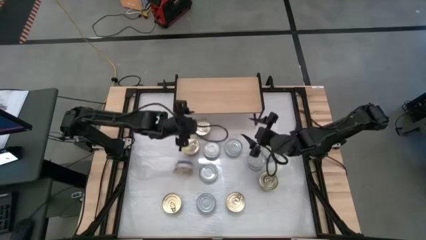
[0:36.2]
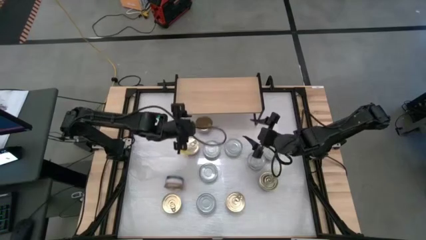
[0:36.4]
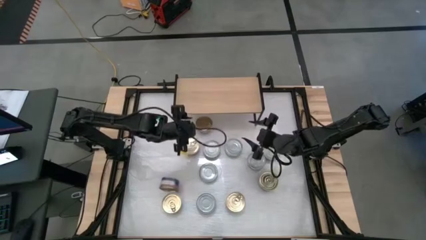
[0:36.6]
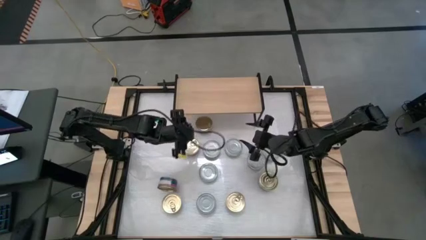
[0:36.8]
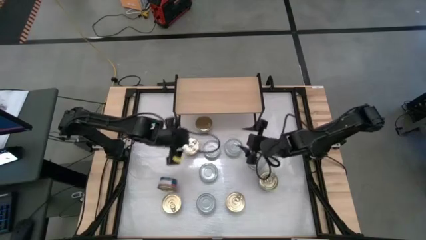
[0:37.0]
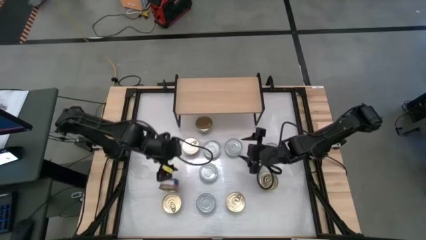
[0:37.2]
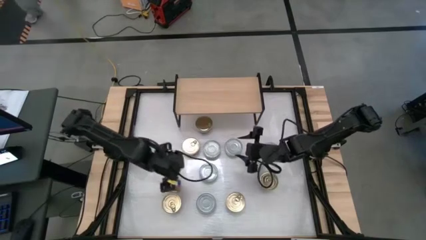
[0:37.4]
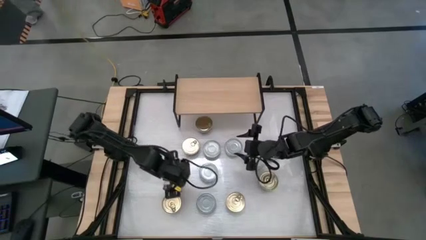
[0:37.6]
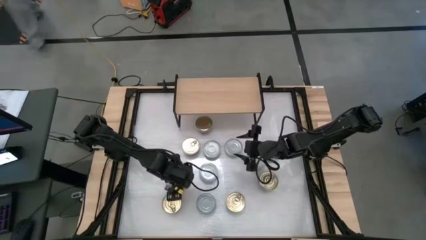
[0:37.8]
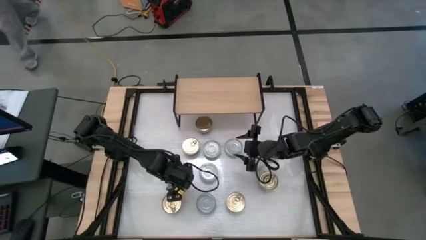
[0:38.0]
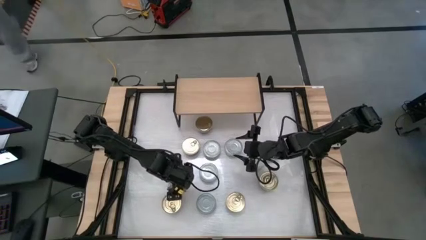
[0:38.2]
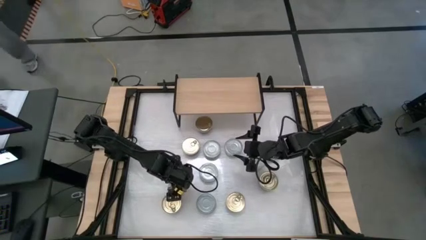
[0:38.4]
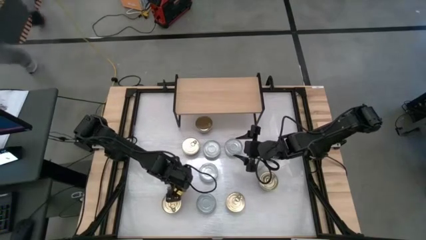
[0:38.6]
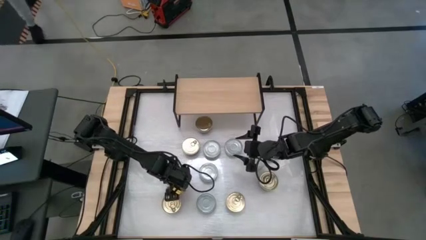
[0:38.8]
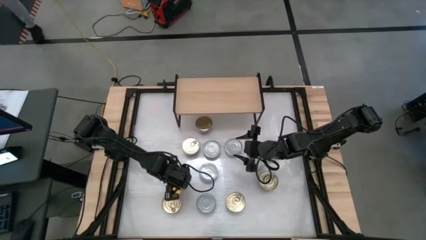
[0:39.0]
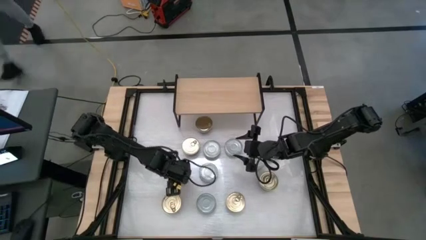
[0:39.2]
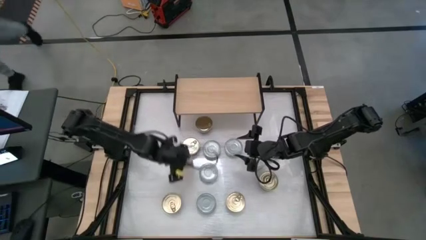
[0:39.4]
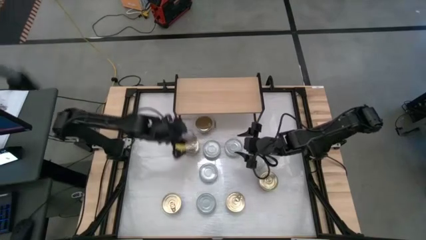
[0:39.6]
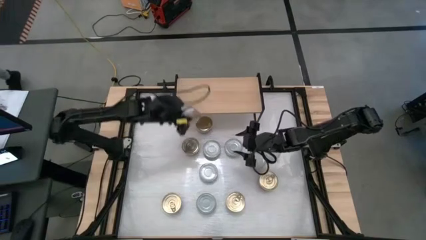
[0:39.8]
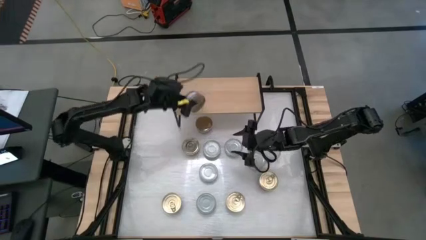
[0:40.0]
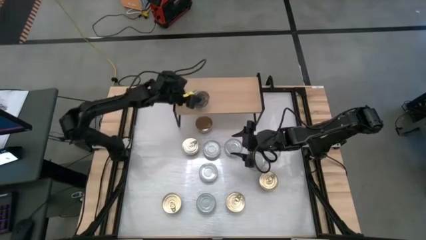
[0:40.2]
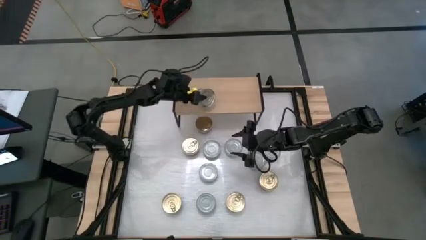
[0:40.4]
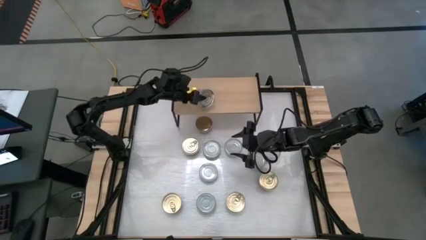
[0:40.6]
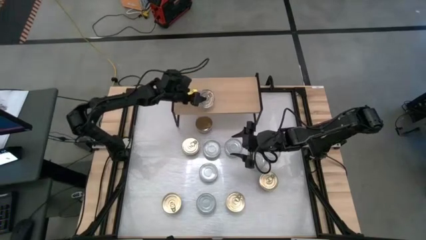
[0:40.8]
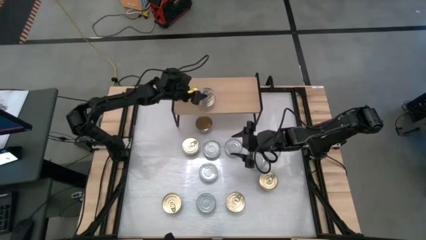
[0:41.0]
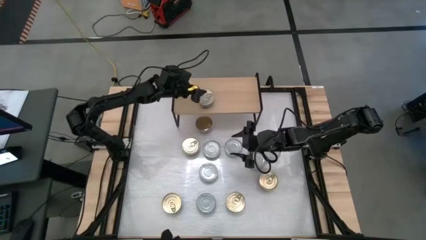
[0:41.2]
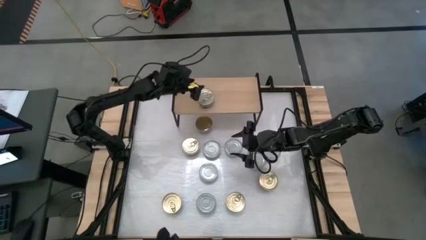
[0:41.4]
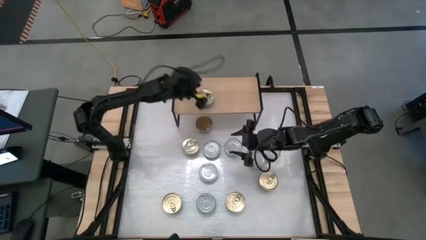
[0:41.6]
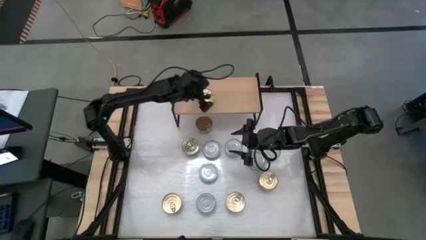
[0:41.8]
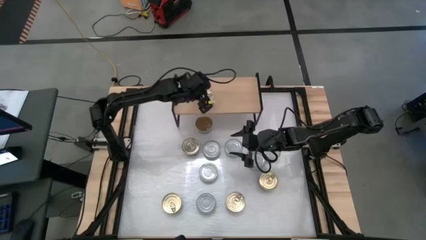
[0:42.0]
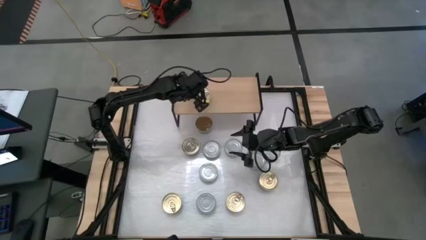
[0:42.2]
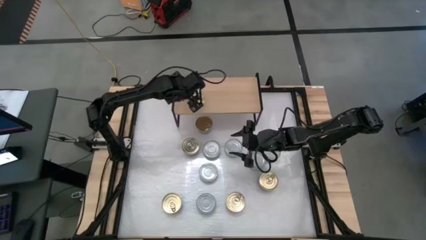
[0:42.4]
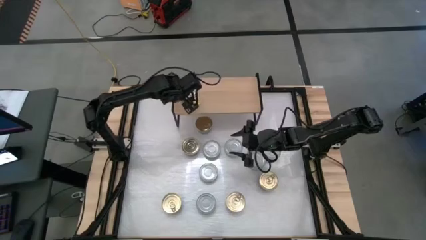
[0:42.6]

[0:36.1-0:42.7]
Task: Stack canned seafood by type on shelf
Put the blue tuna can on the shelf

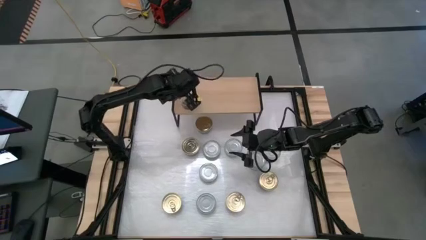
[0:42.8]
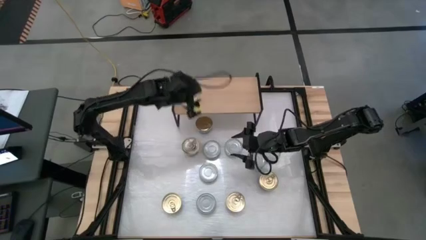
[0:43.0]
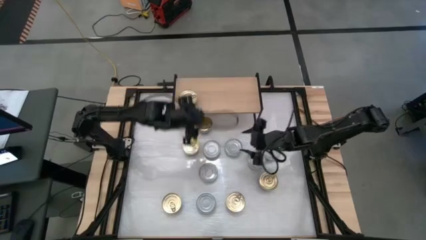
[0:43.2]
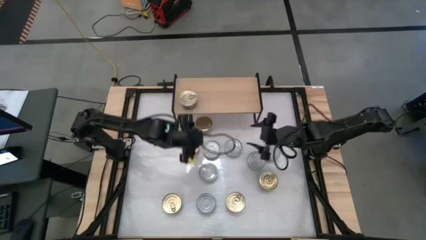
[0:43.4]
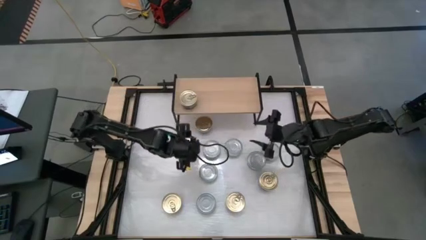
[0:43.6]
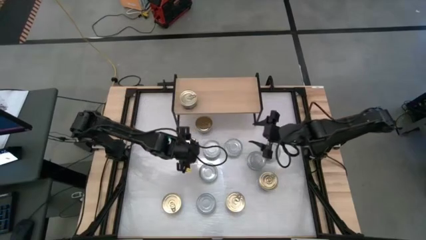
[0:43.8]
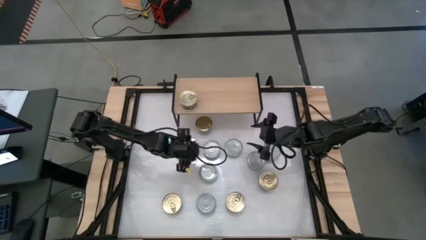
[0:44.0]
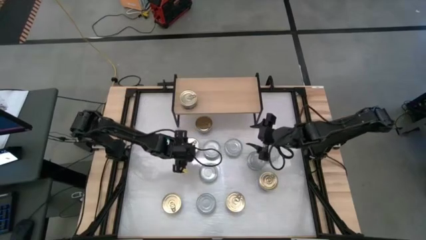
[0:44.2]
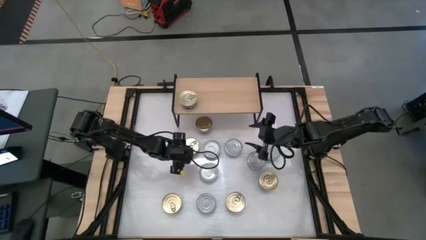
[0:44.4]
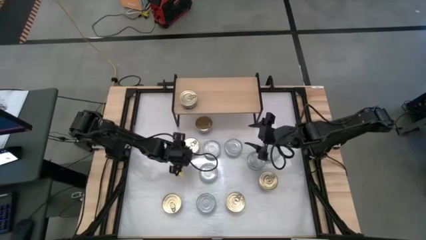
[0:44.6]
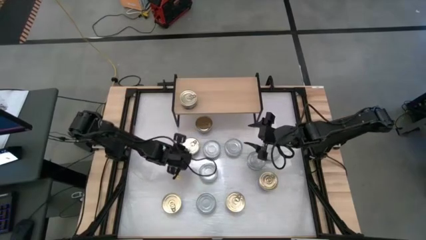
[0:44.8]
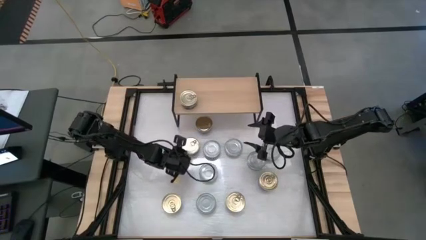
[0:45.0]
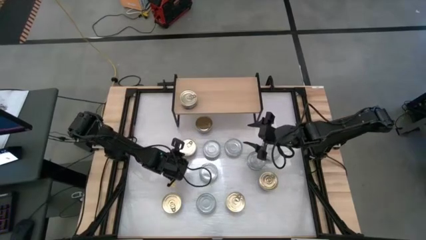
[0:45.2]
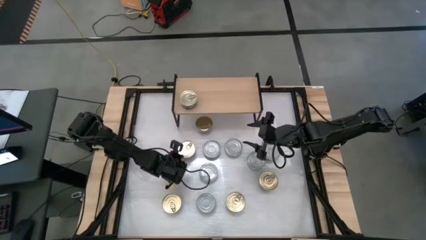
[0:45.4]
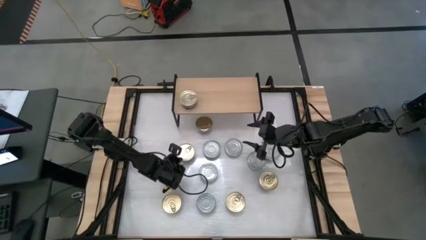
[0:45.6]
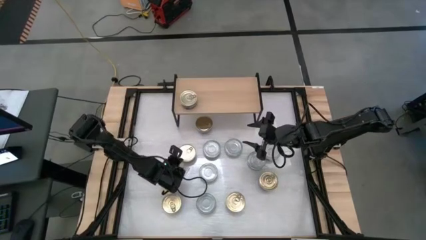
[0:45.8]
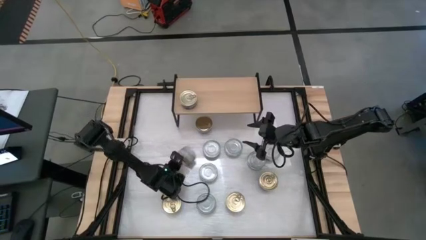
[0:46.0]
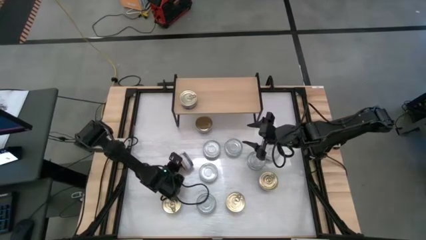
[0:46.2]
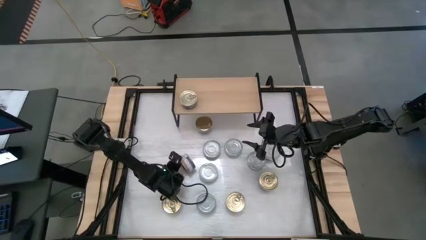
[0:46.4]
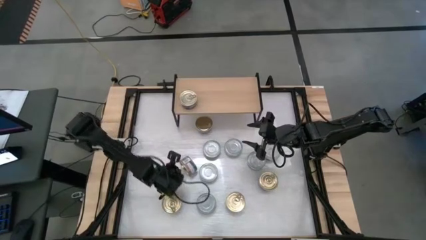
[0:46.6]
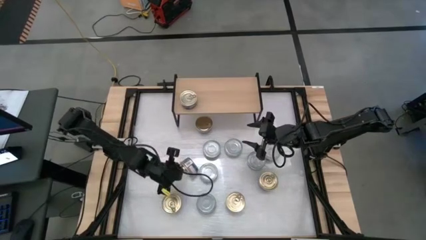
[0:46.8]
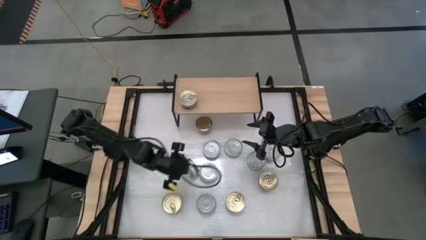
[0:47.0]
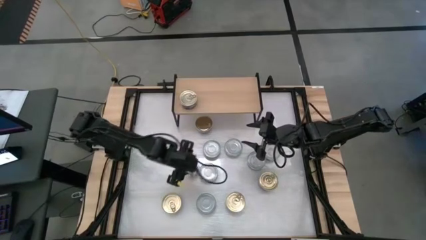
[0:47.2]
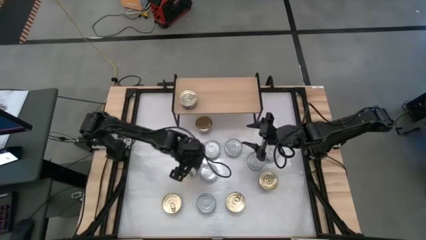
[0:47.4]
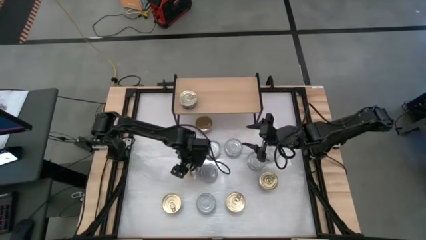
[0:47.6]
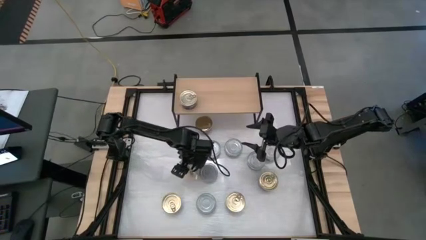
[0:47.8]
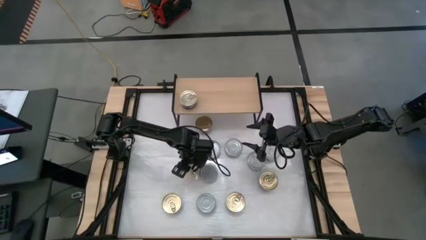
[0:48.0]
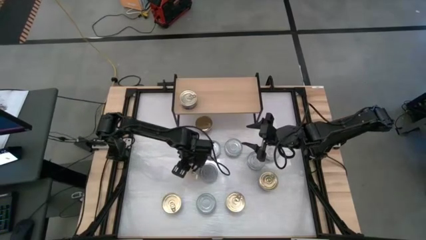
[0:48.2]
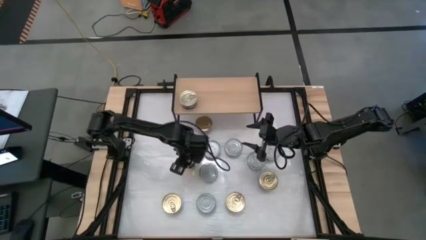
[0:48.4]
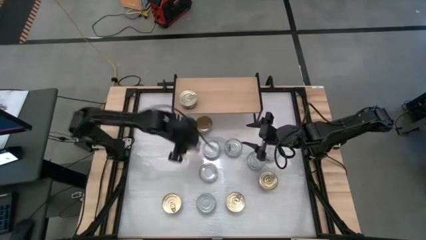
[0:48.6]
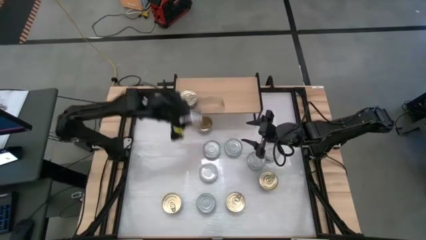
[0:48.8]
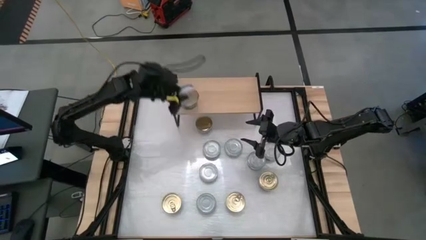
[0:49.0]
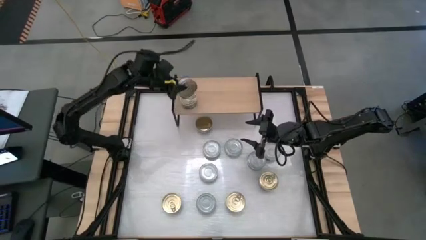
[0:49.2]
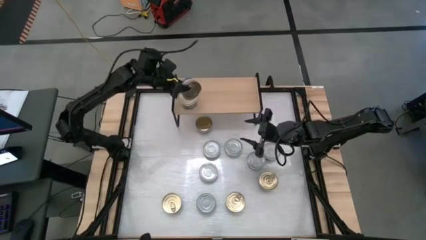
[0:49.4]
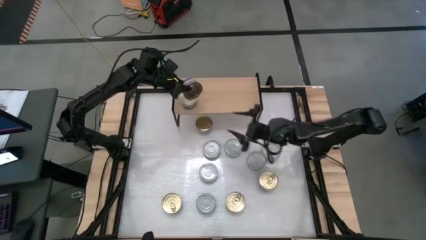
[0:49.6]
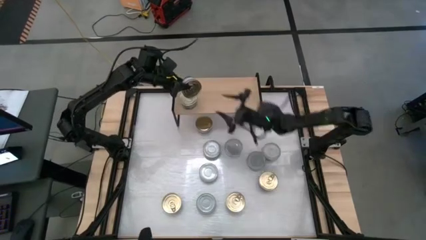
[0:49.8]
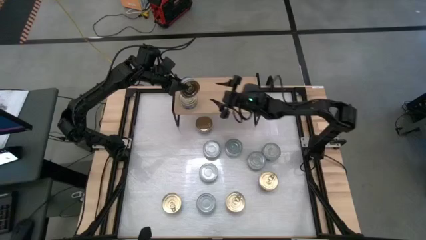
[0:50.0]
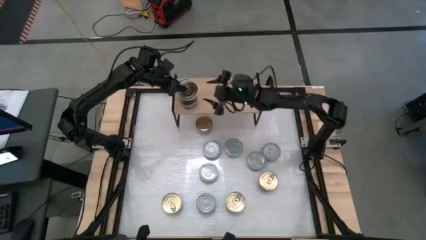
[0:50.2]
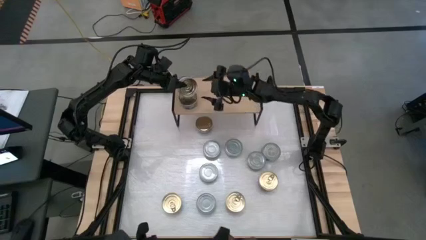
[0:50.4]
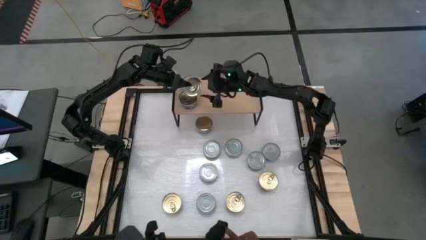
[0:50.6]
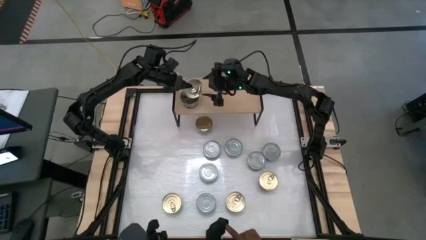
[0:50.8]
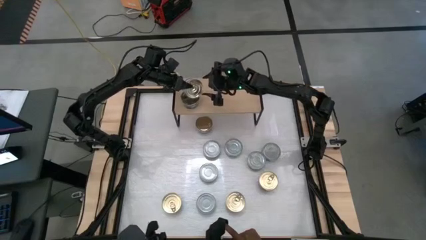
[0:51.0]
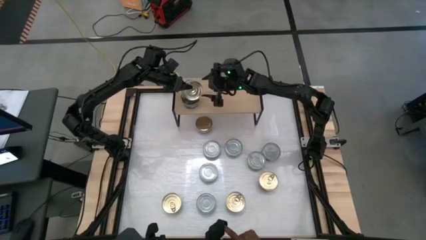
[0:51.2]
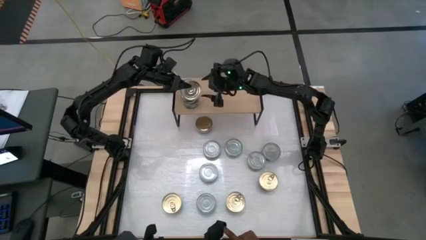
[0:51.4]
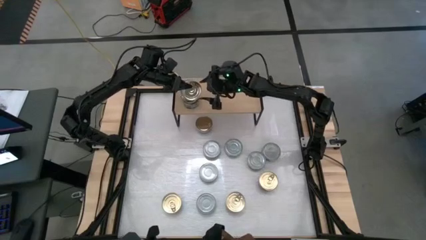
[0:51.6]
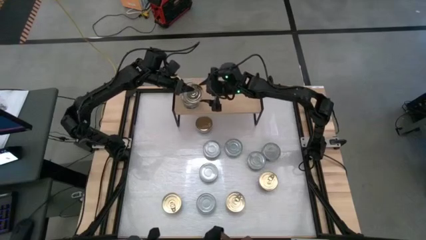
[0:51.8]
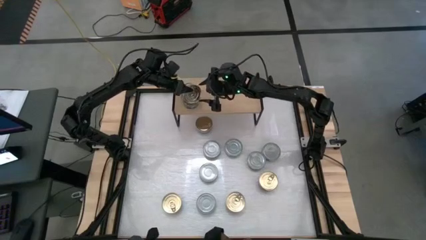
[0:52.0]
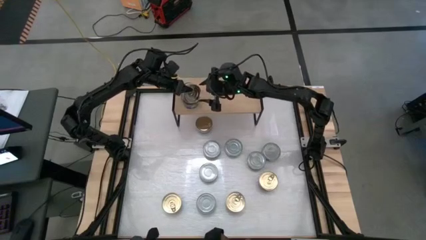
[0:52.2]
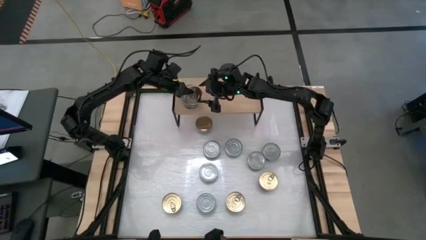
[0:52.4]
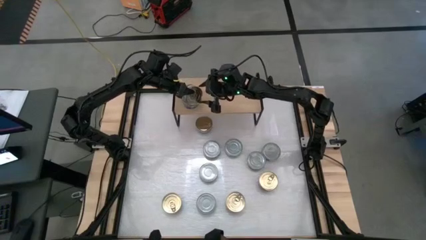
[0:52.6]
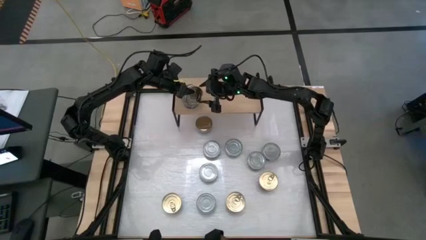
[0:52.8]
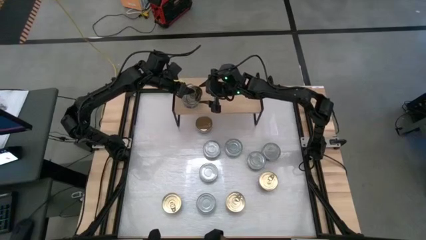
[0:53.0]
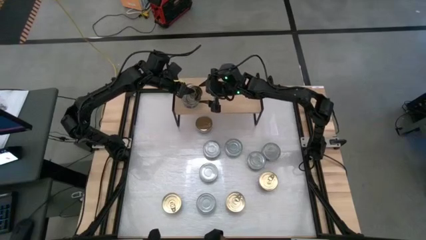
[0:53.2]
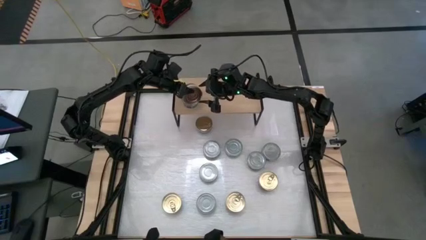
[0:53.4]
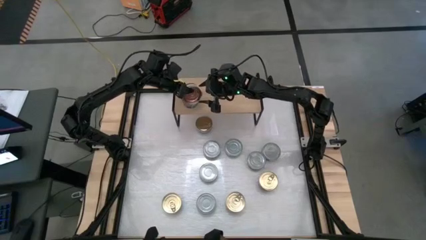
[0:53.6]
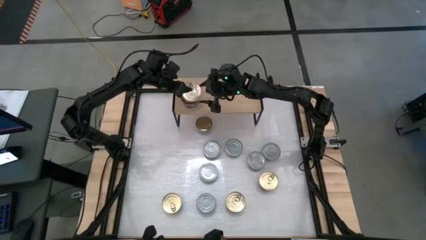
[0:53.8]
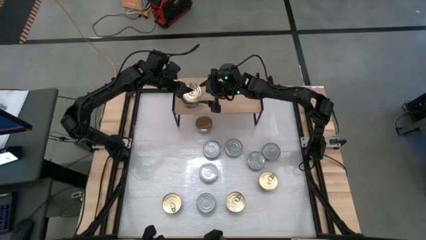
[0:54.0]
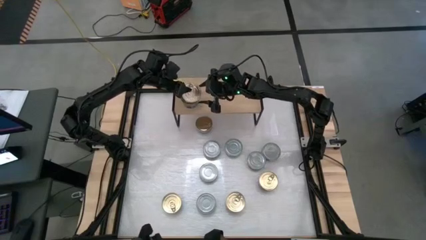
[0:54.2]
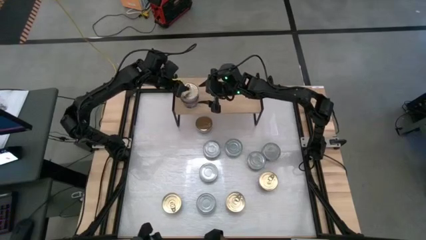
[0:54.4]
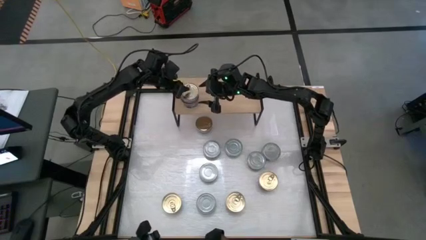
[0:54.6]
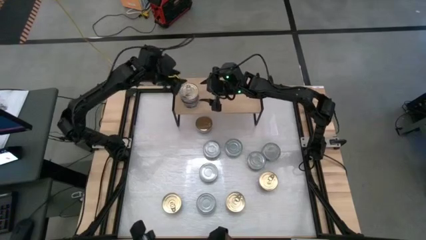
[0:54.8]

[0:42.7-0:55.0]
Stack the blue tuna can on top of the other blue tuna can on the shelf
